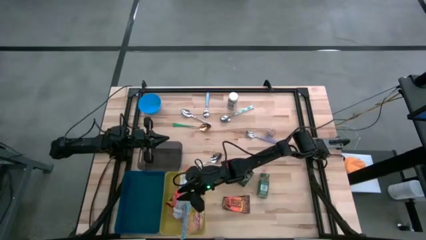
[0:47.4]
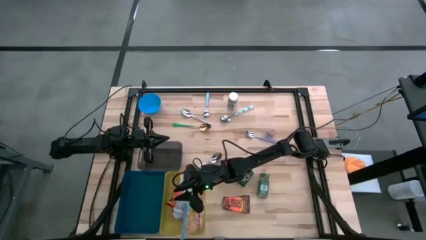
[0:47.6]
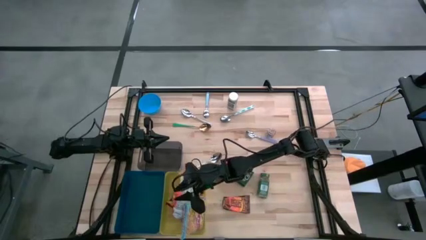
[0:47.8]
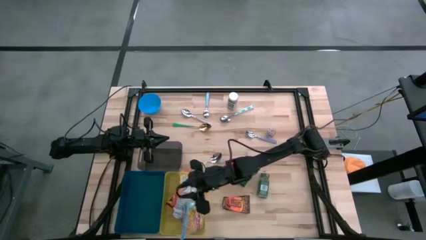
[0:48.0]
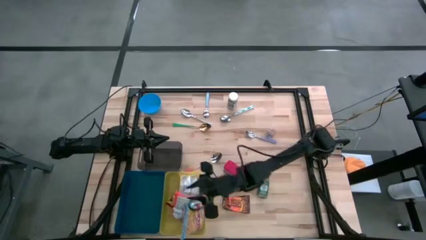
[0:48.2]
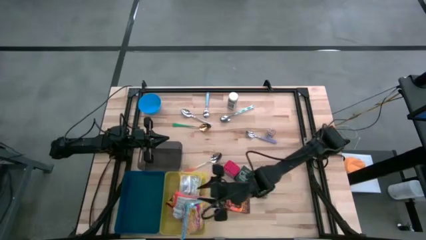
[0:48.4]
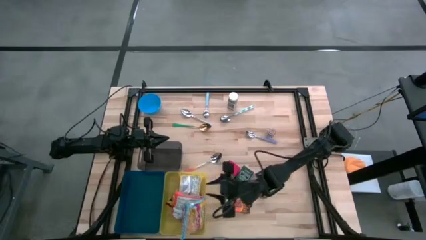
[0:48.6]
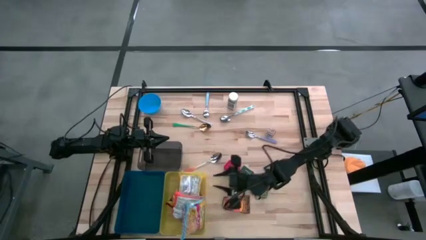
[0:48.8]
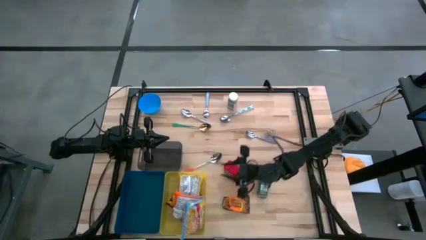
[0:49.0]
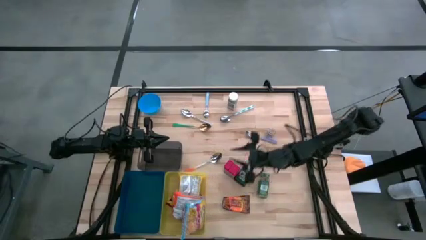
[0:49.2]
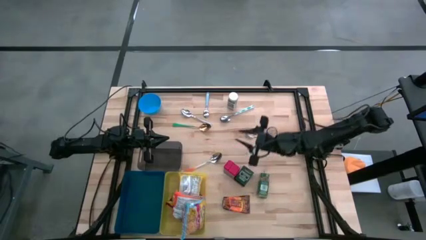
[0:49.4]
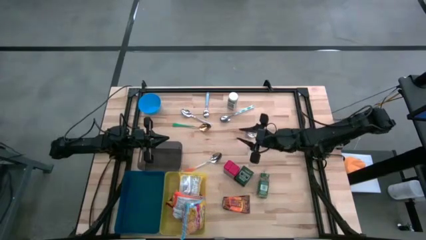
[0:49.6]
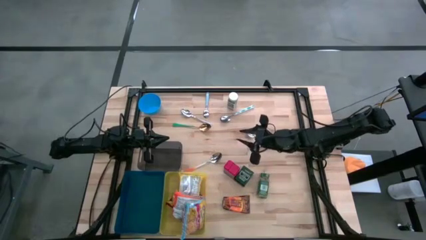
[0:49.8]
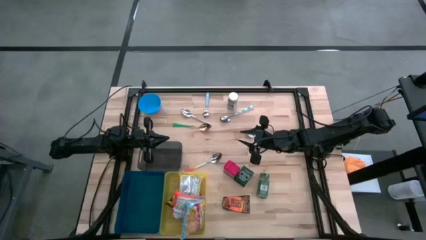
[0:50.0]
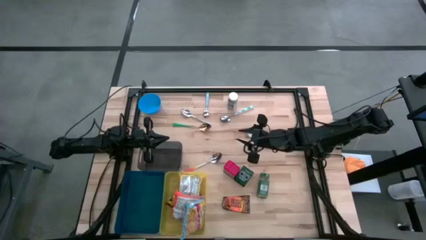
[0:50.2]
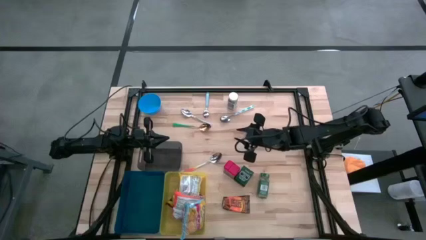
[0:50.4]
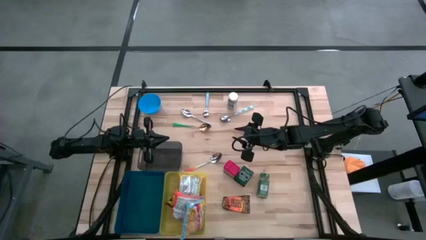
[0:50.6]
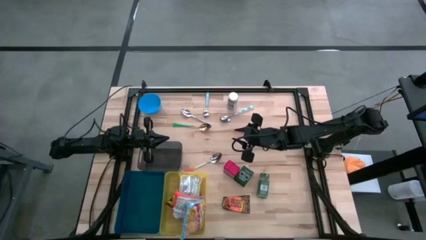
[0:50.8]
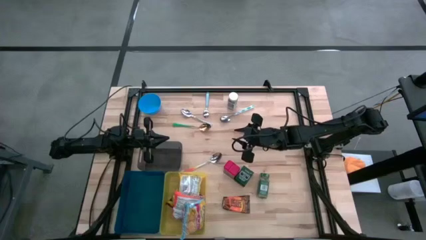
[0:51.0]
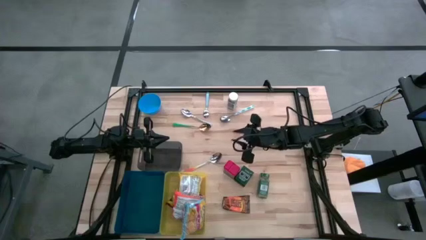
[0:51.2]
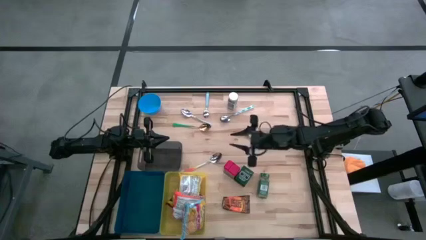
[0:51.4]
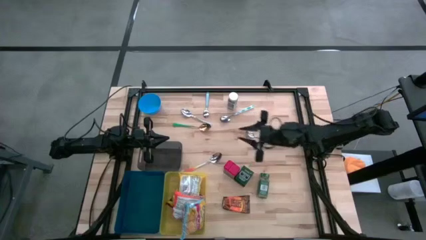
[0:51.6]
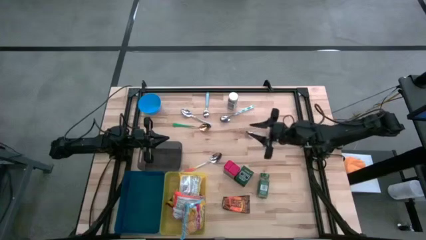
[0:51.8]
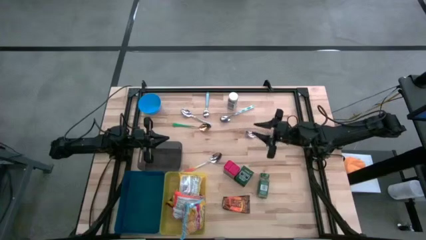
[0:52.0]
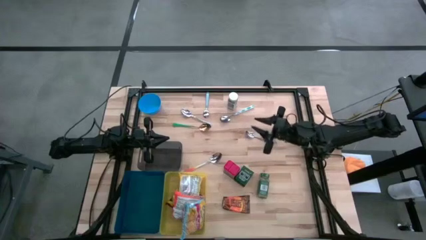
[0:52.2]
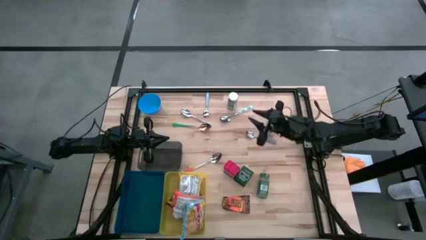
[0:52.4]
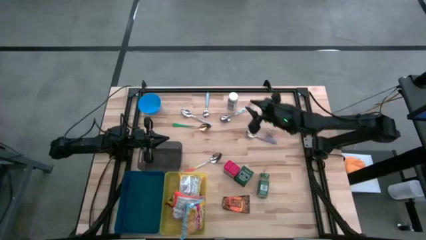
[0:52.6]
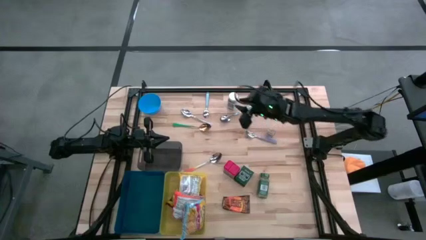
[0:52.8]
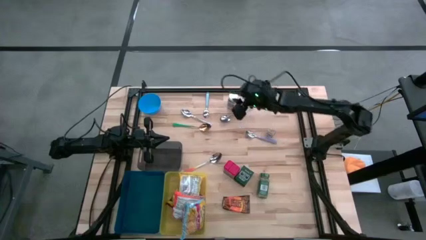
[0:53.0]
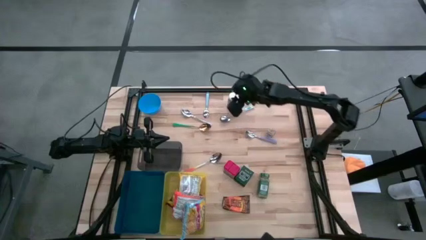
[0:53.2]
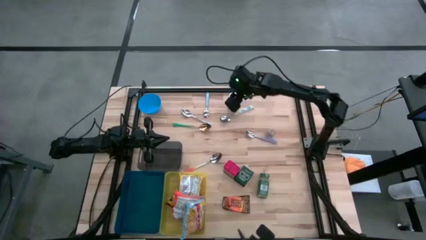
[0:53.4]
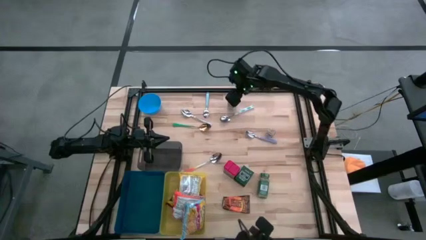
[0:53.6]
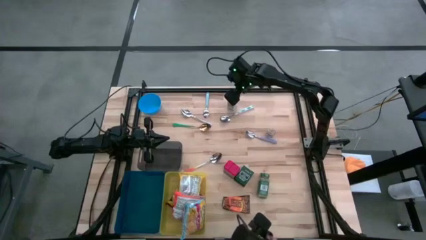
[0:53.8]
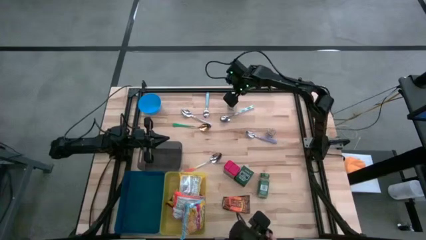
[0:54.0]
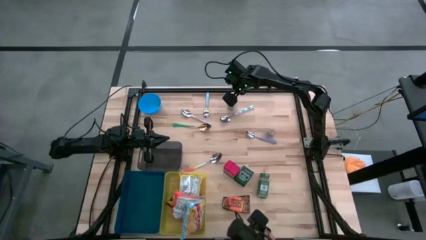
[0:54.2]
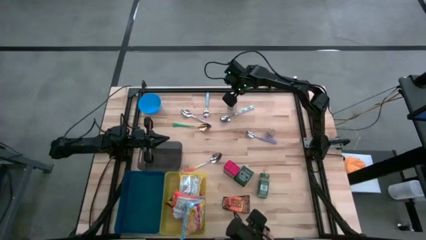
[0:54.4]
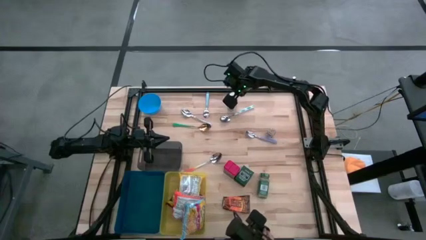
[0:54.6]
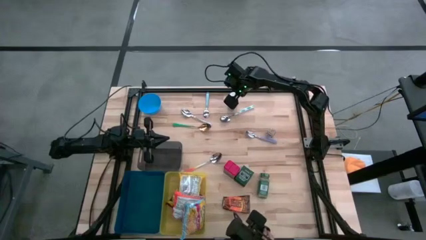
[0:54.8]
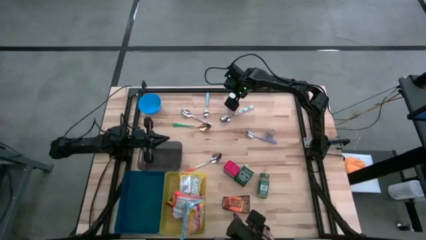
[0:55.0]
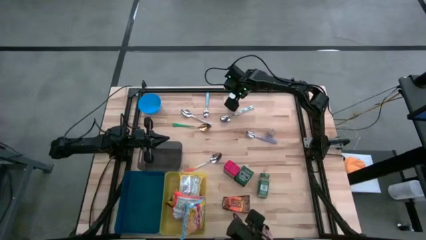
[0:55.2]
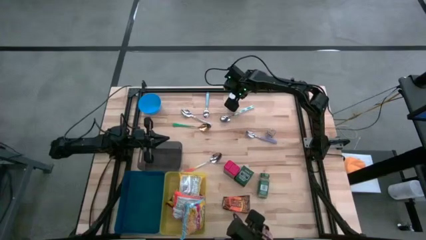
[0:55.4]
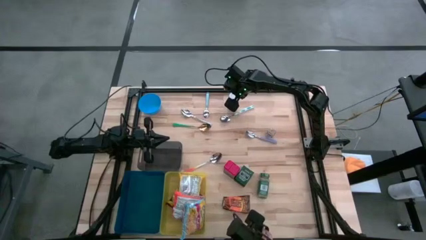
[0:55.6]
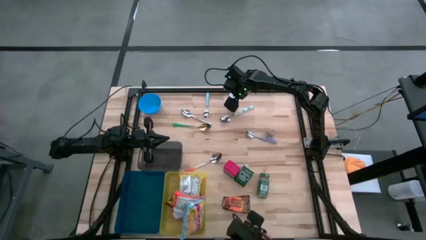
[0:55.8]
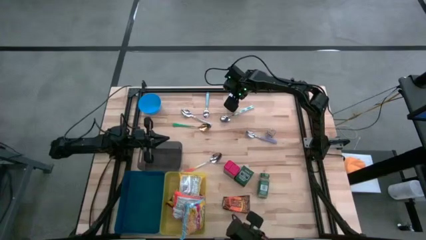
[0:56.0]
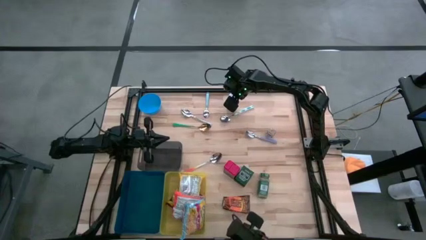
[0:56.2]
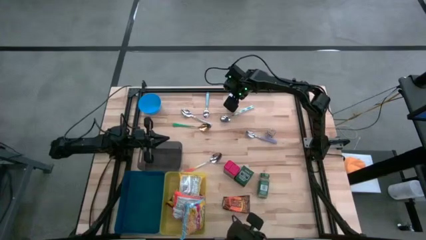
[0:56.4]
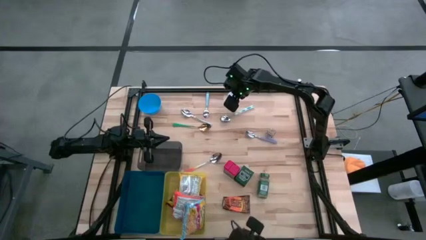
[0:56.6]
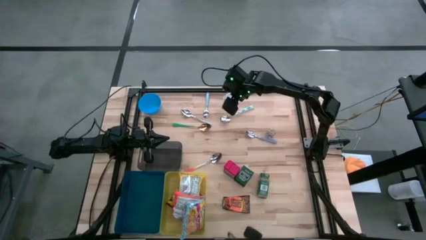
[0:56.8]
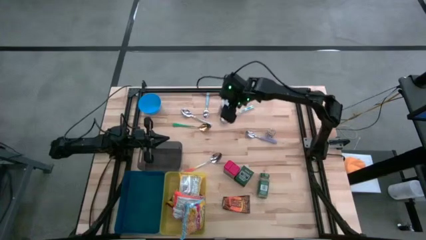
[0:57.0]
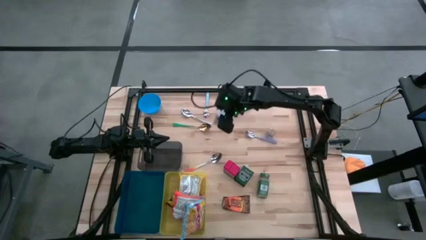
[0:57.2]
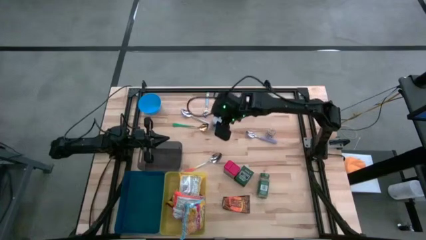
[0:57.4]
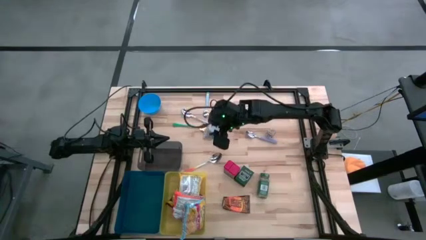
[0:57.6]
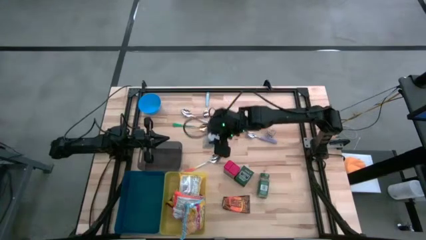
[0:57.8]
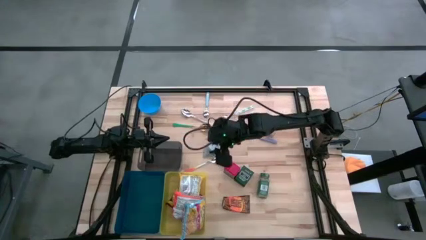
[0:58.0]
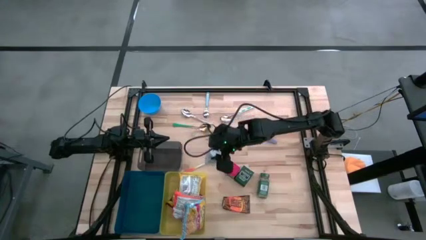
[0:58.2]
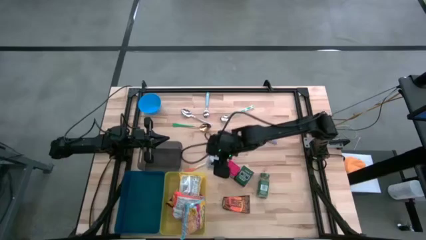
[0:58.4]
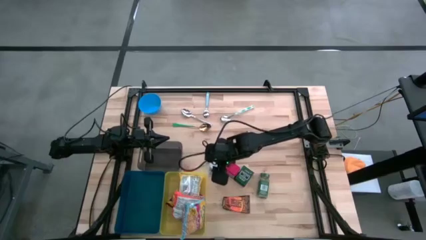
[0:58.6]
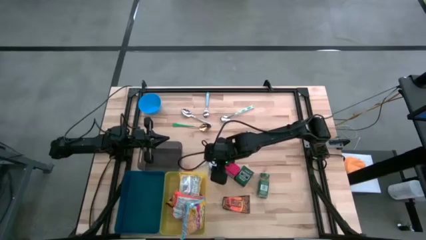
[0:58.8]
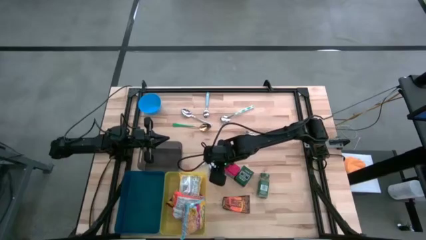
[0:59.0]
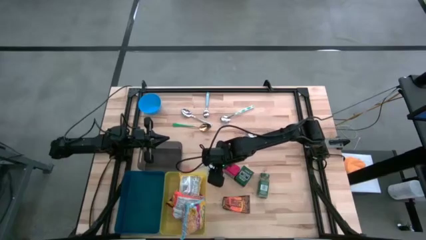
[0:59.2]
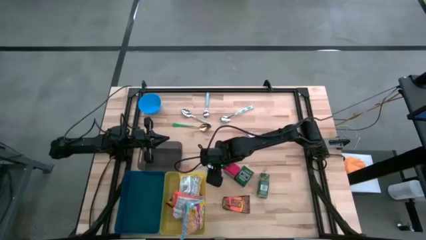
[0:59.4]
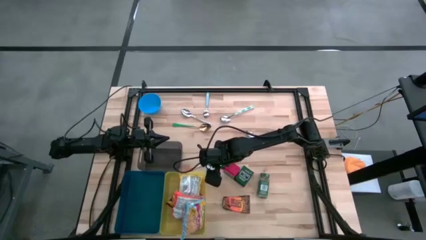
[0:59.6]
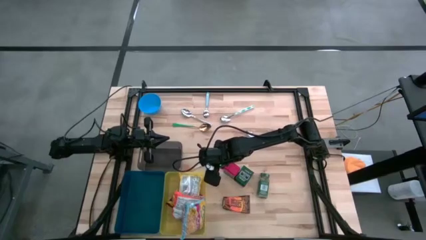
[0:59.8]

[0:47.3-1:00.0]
Put the white seasoning bottle into the blue bin

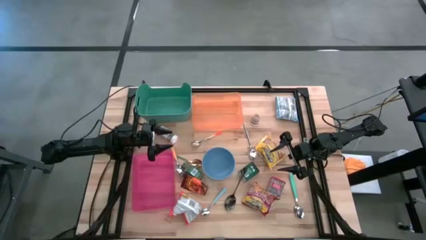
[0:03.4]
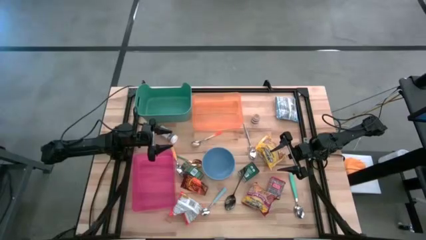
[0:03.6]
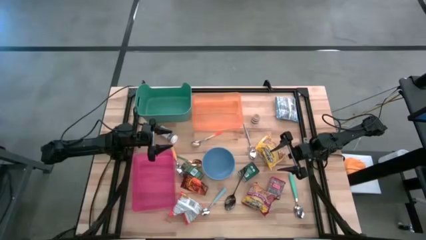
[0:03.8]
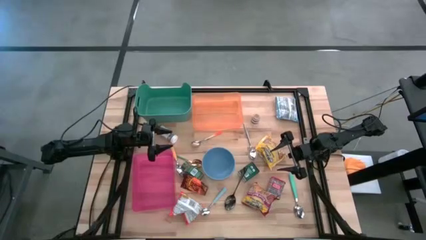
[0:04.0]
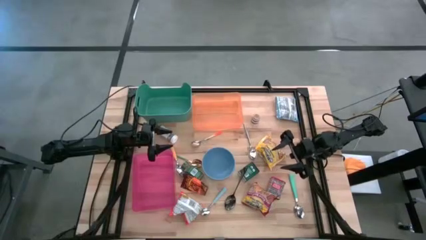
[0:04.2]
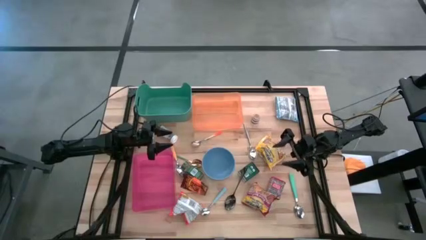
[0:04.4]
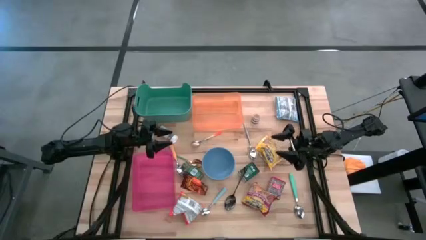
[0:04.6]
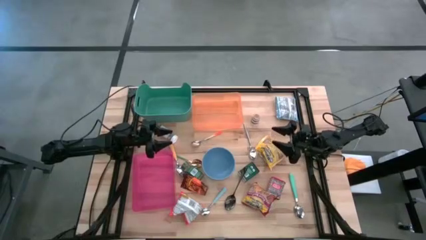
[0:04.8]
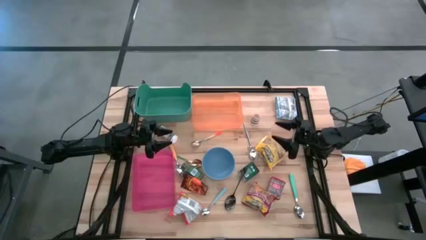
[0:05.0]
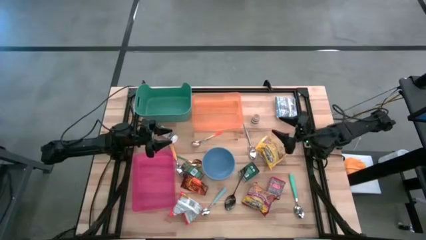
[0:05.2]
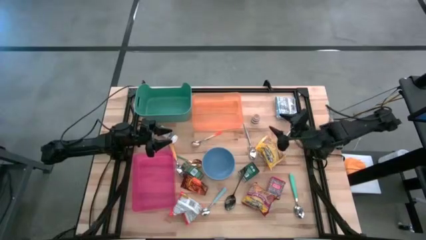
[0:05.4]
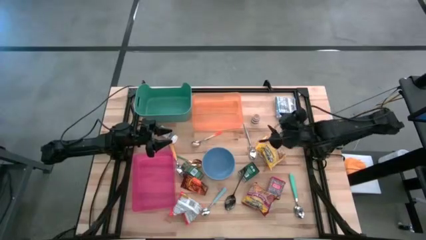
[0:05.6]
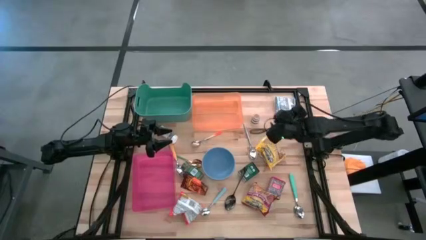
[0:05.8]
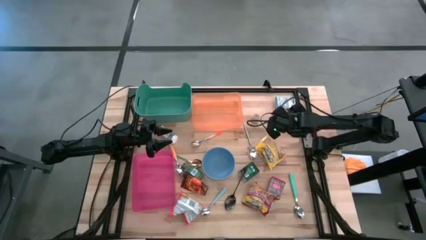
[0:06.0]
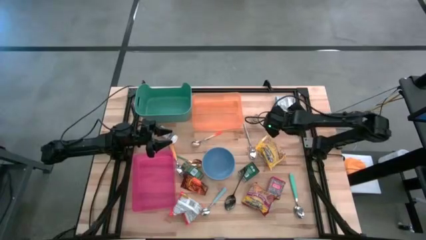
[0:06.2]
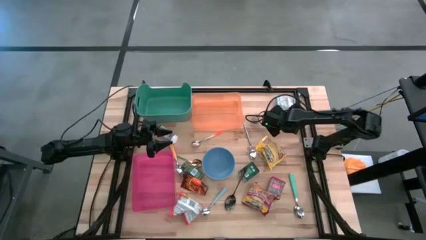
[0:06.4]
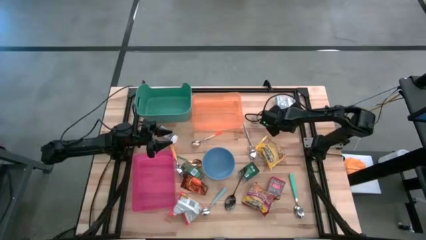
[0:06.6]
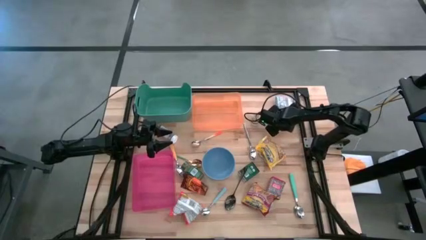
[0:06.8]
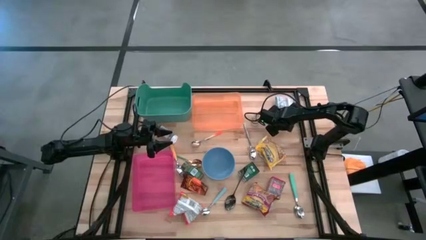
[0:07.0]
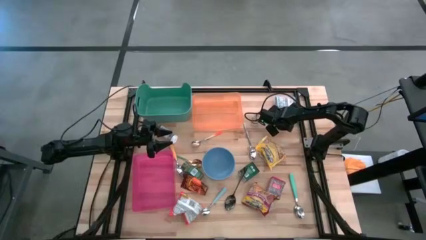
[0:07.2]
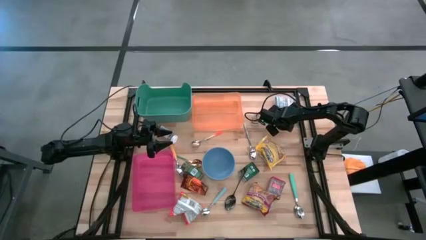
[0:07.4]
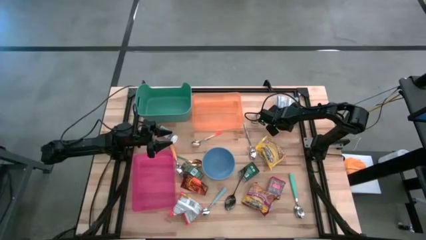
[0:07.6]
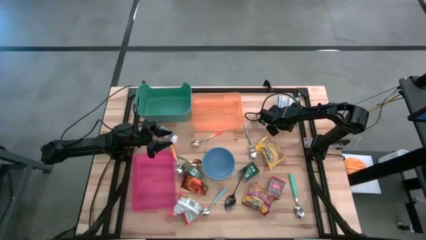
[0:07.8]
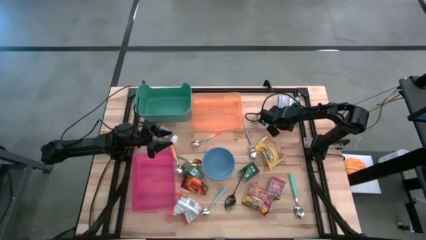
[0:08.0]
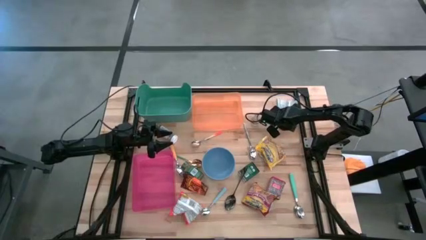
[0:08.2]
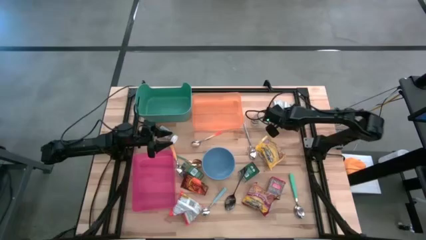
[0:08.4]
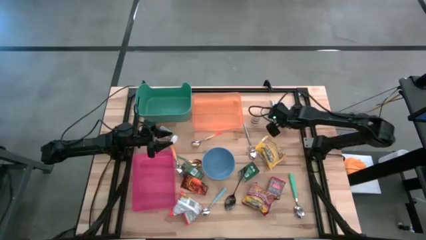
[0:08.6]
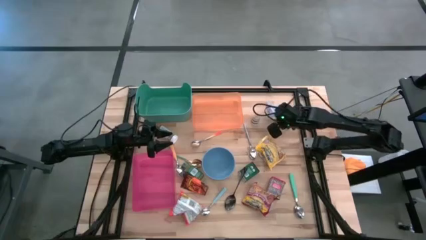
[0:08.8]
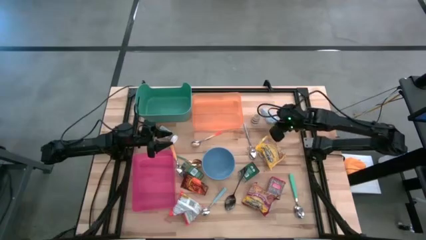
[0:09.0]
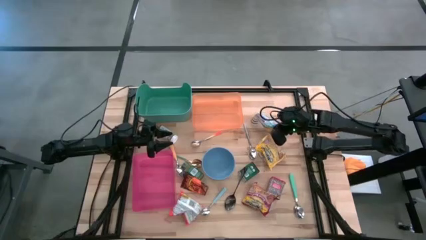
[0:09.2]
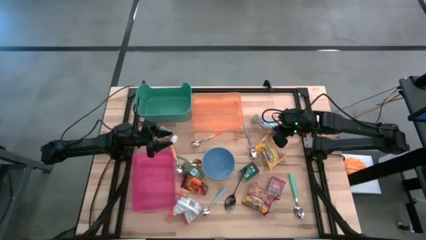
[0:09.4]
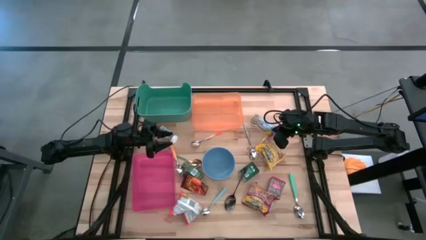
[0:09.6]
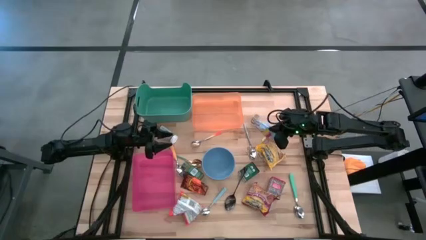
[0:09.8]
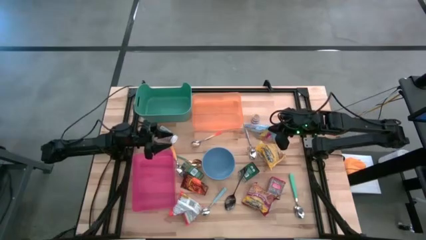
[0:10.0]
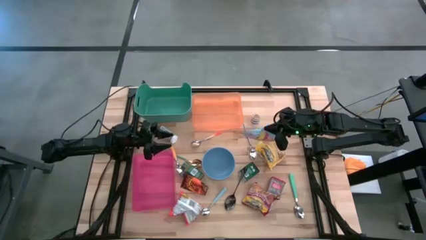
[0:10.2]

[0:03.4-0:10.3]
Put the blue noodle pack into the pink bin
